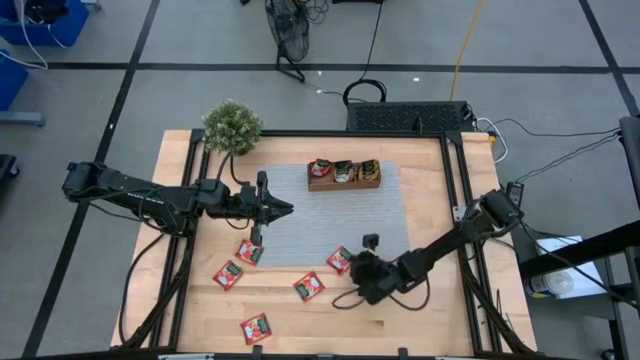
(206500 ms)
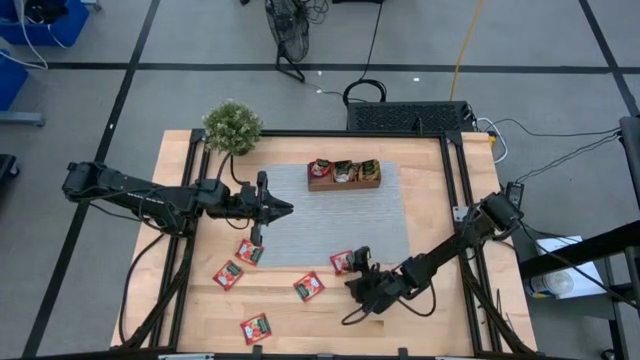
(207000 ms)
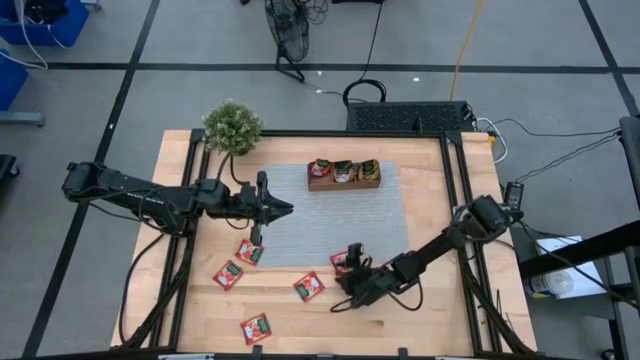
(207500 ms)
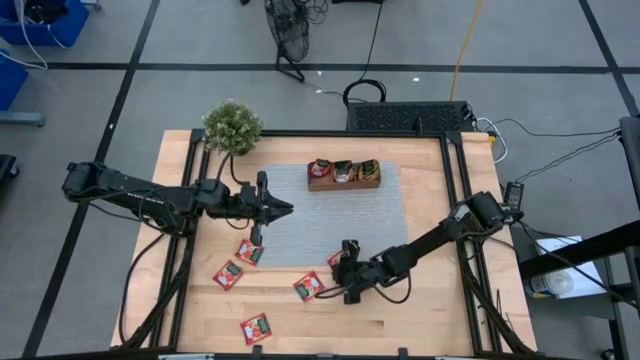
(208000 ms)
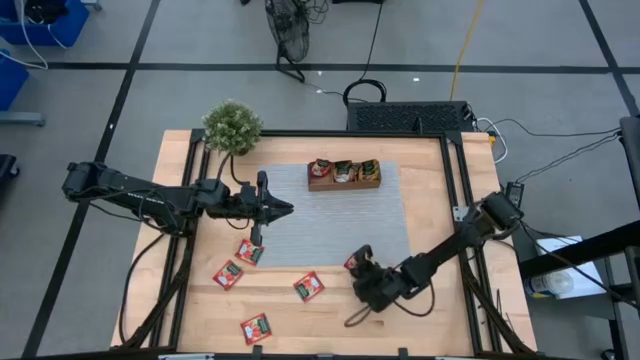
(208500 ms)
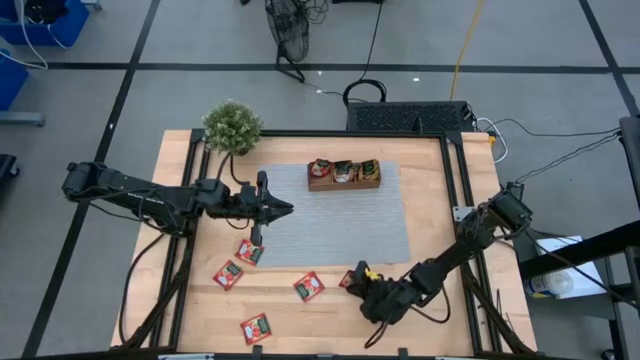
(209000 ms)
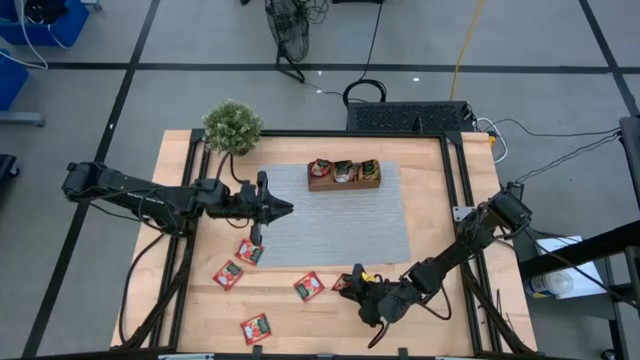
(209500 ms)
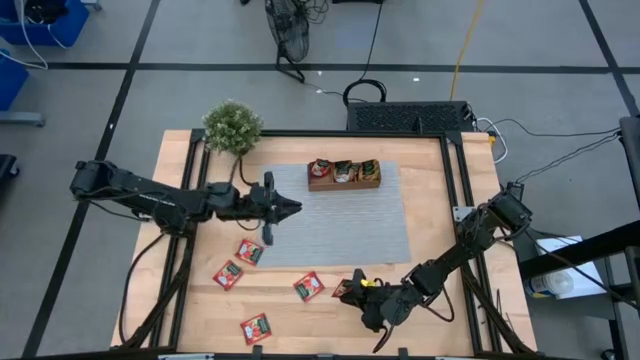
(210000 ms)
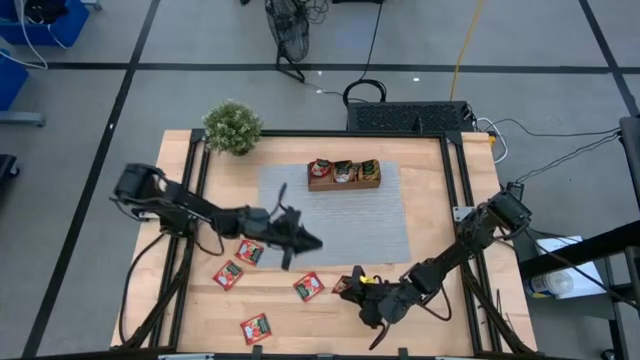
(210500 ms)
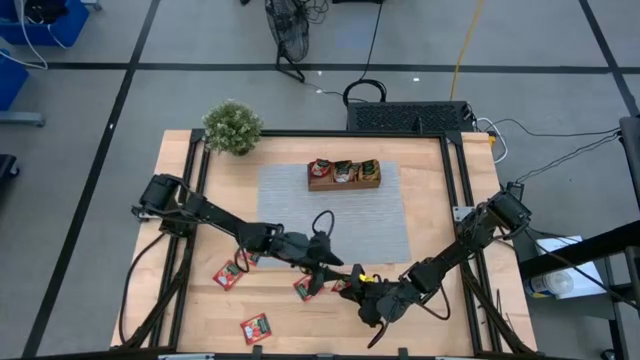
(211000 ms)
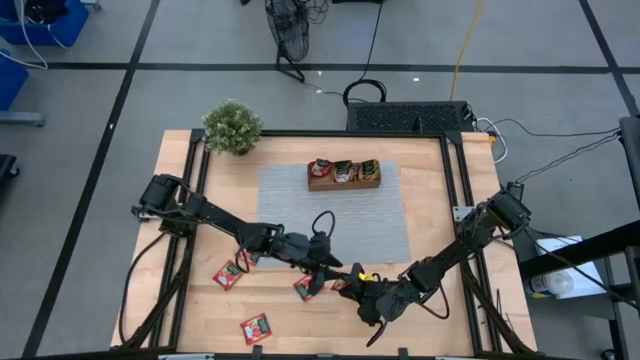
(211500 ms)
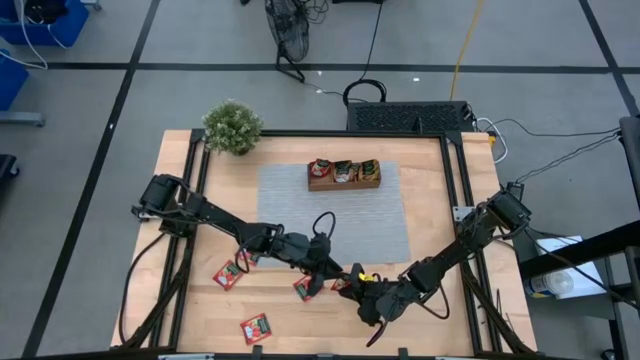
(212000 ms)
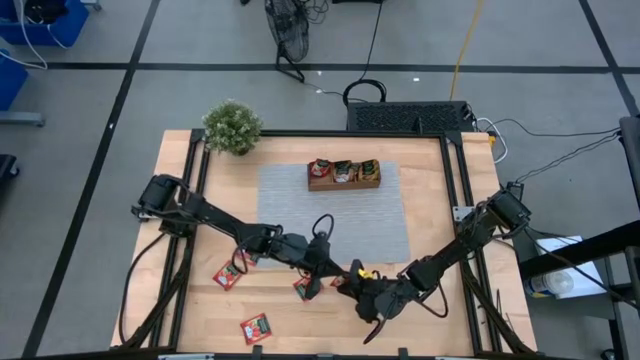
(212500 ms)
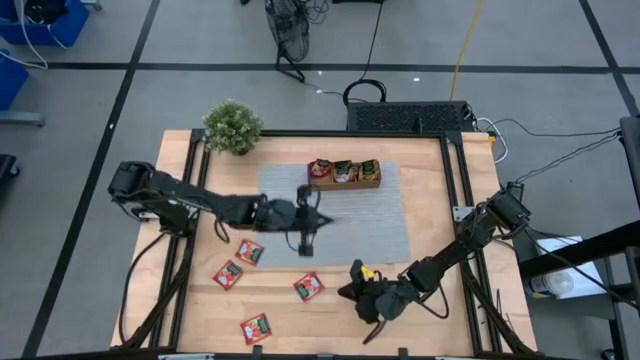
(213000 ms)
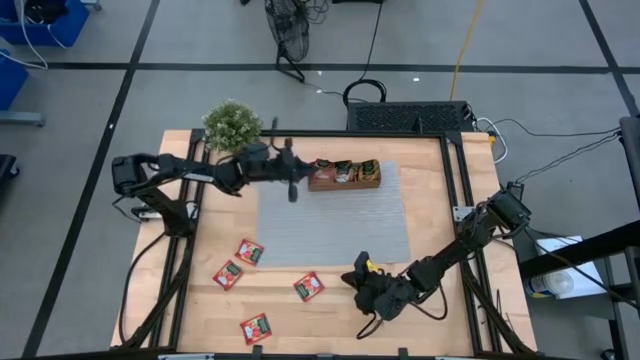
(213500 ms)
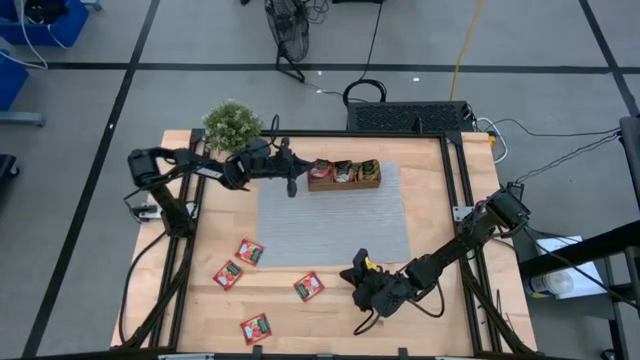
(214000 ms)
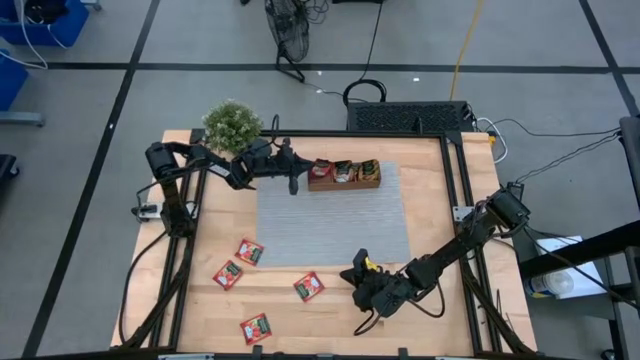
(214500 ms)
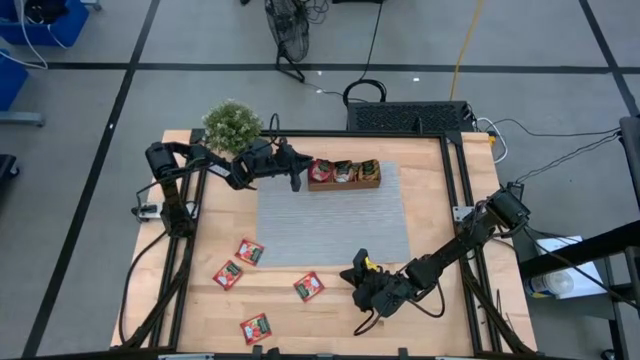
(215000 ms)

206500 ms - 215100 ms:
Task: Pick & Place Tea
Put the red tea bag into the left section of the wooden organizer

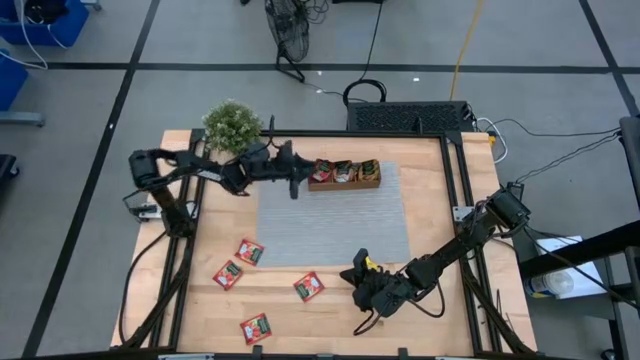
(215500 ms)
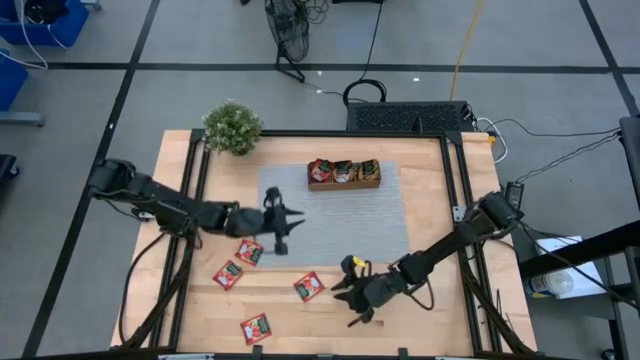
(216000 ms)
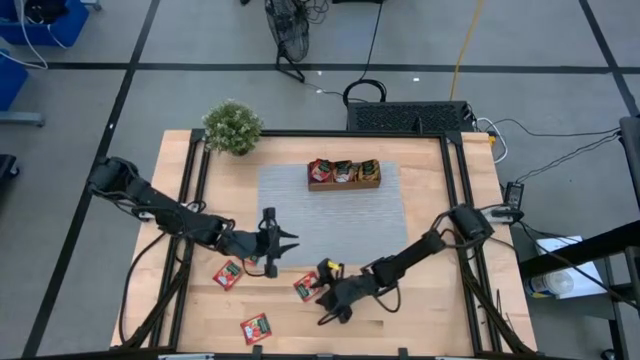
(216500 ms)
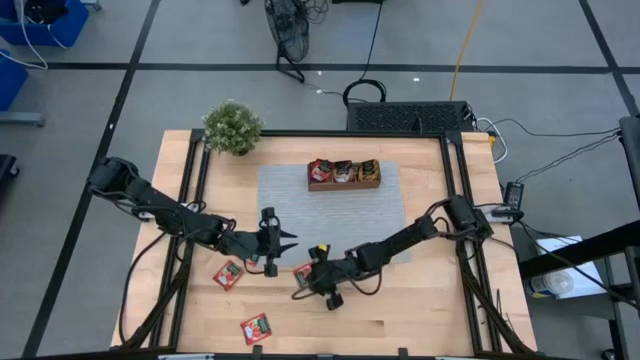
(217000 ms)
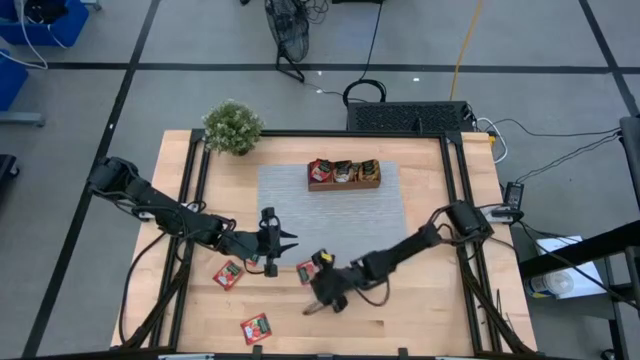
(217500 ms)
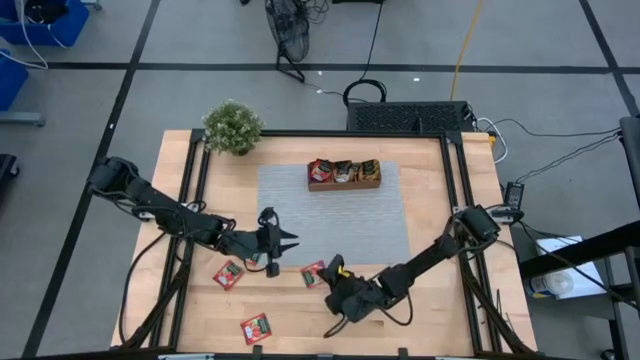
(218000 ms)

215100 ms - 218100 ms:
Put the red tea bag into the left section of the wooden organizer

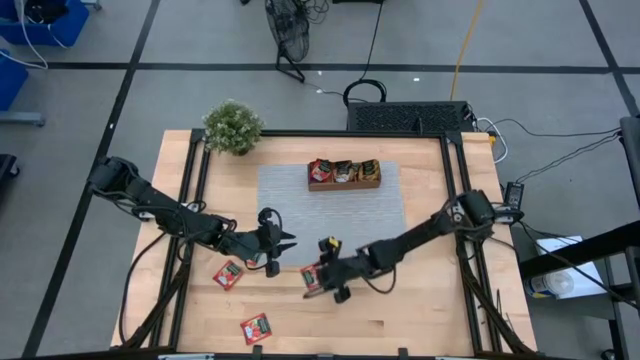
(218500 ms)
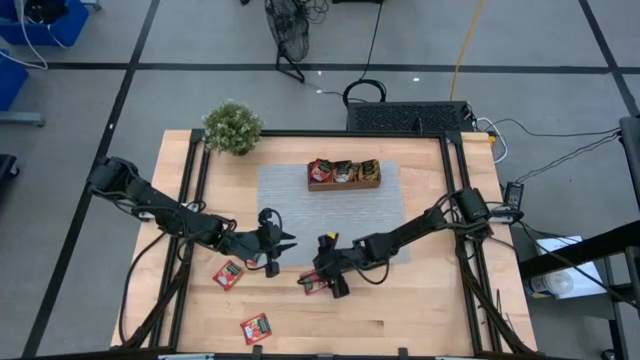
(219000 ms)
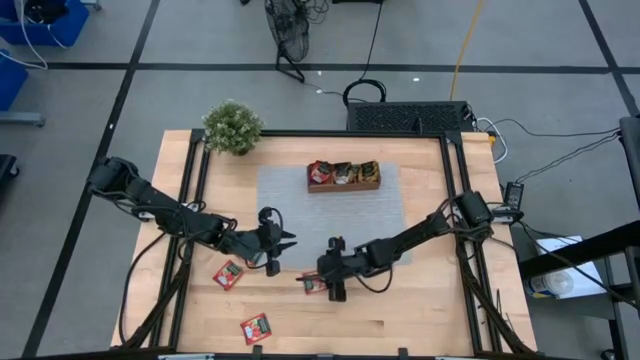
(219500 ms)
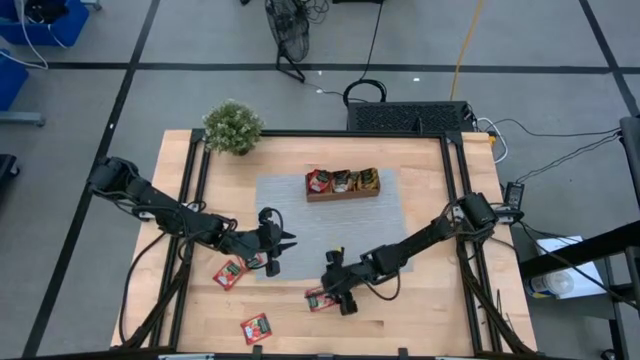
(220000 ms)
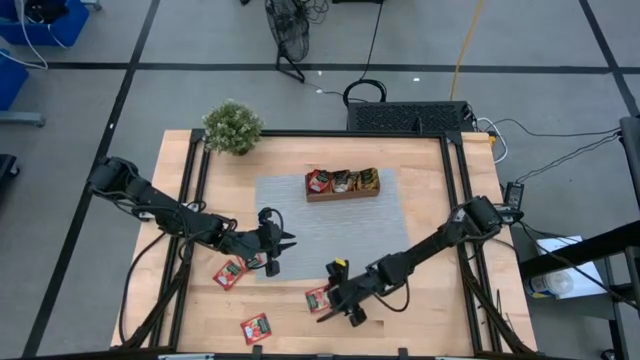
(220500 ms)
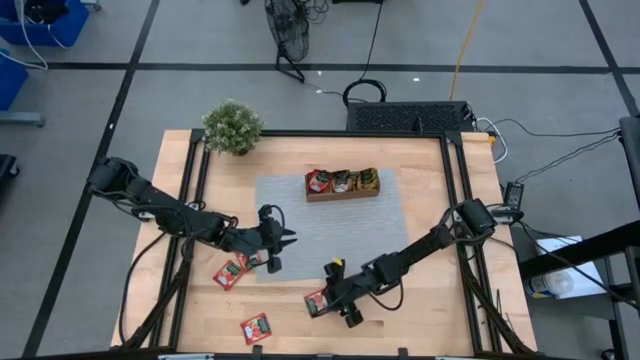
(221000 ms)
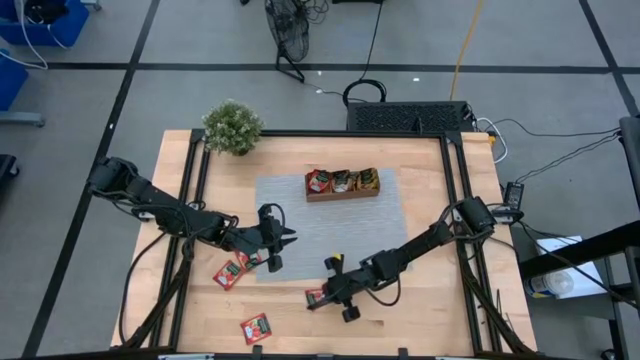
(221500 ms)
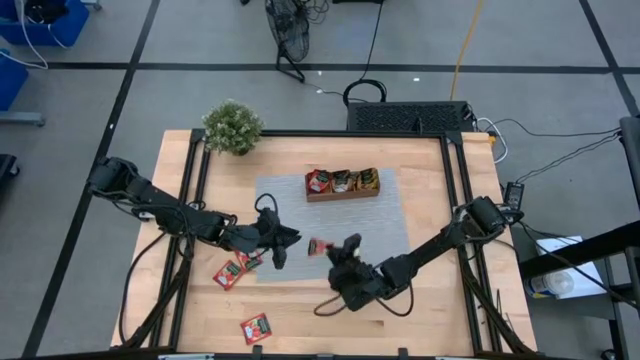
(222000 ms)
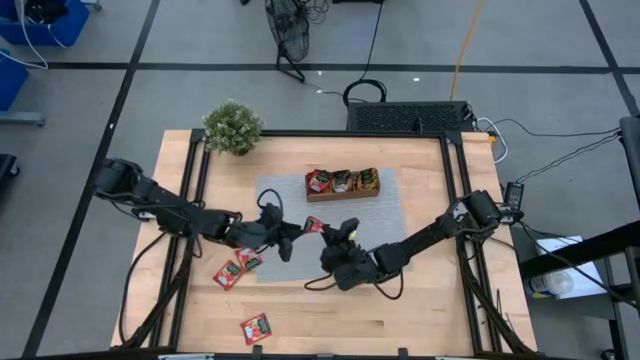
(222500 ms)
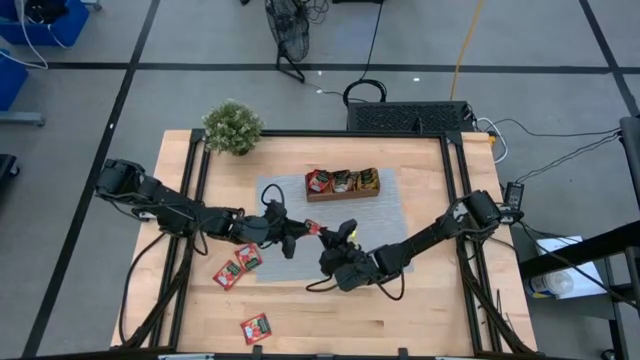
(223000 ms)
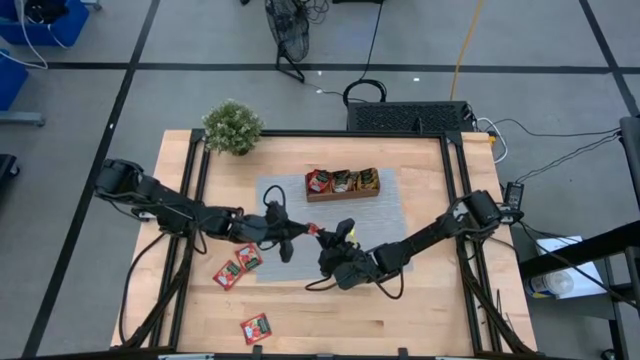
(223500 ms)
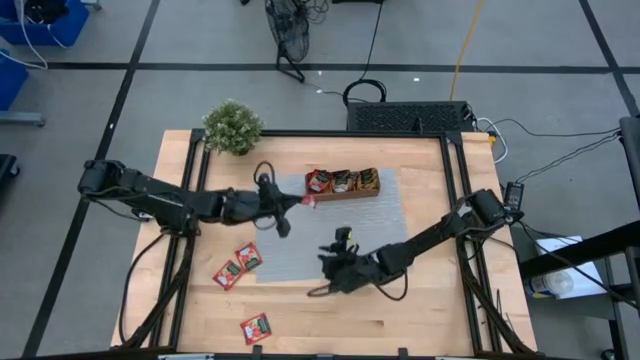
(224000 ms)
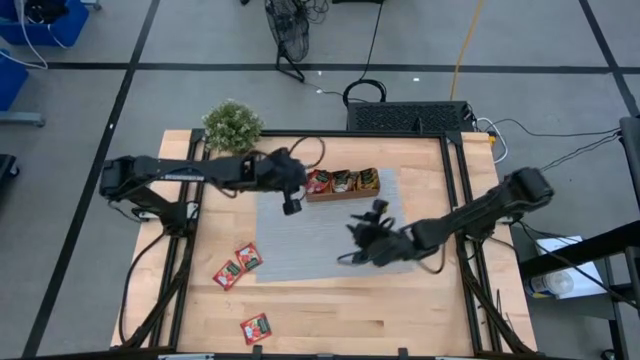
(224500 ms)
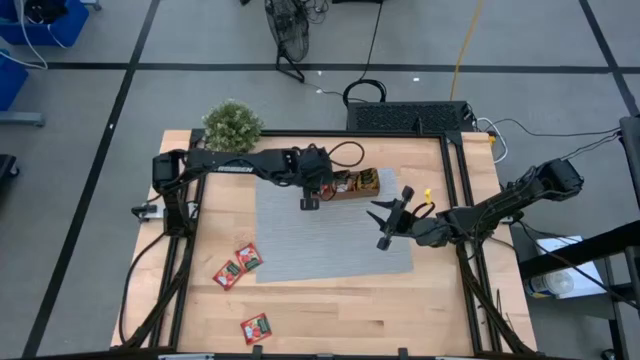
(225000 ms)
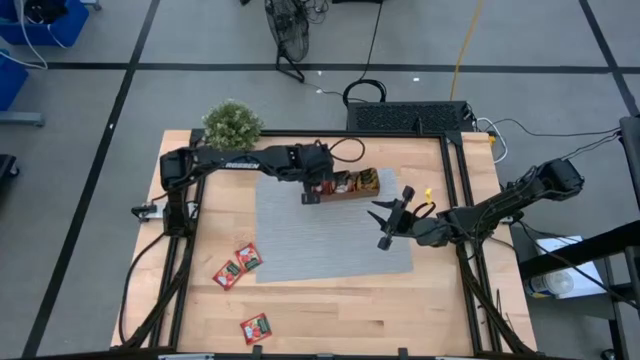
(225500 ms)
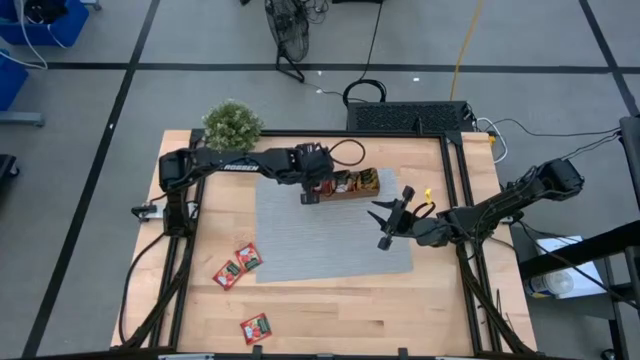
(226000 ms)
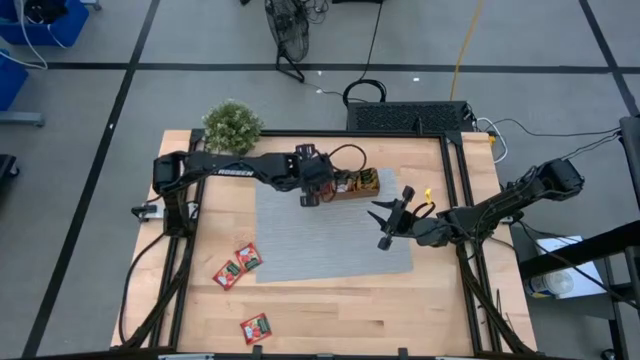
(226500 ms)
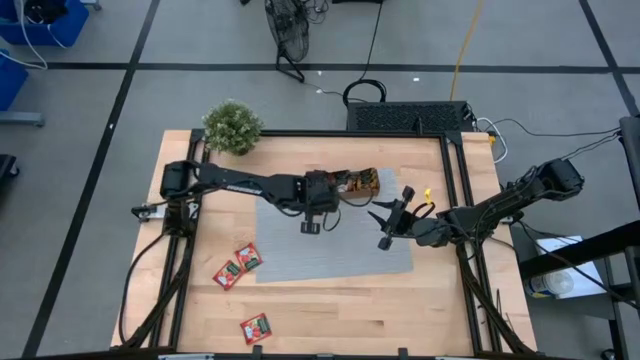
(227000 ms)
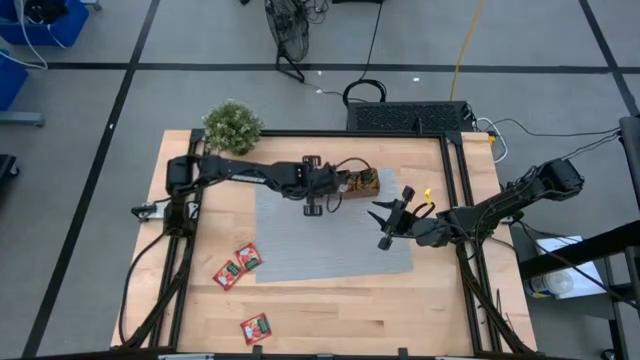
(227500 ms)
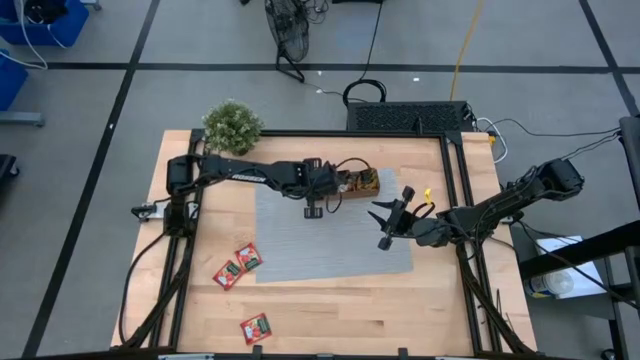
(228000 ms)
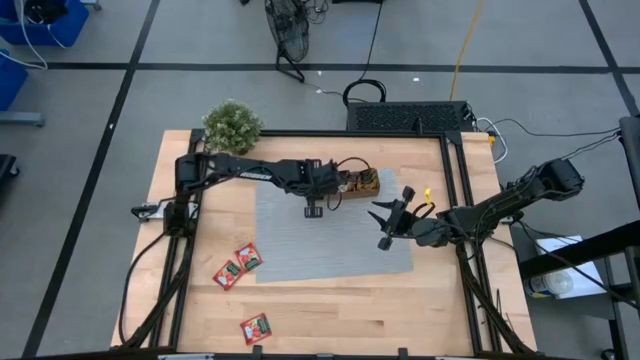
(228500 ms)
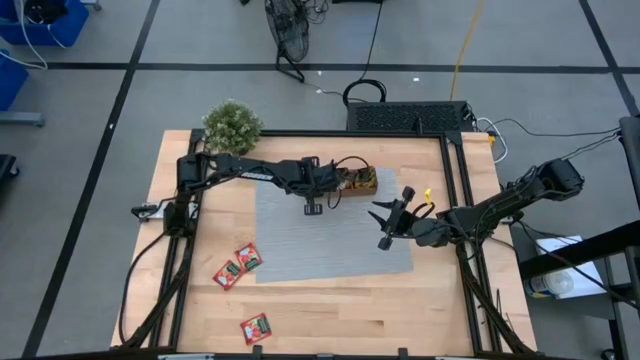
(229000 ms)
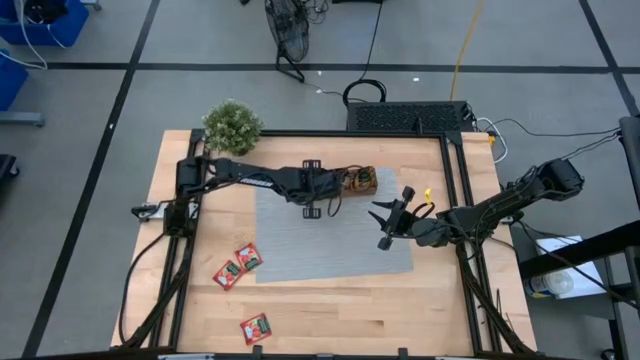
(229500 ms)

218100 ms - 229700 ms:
Put the red tea bag into the left section of the wooden organizer
